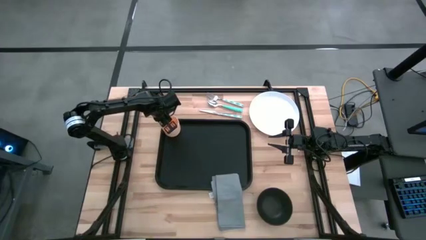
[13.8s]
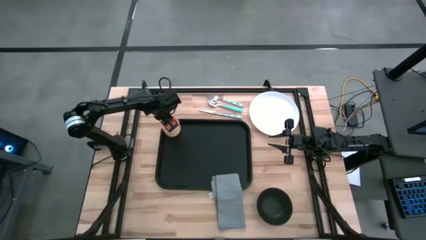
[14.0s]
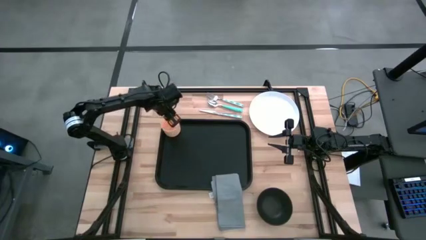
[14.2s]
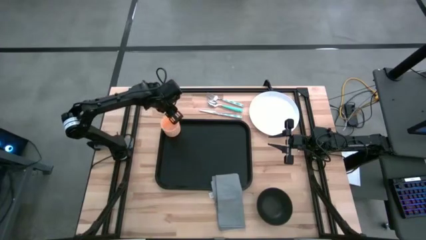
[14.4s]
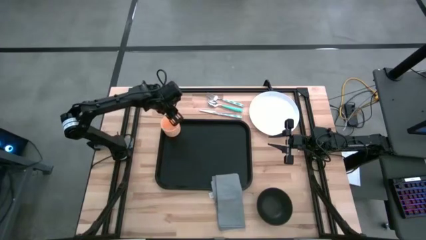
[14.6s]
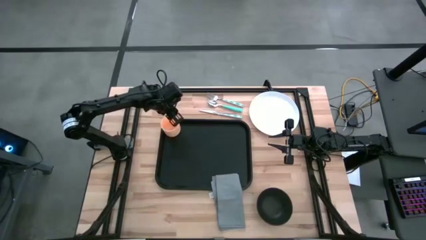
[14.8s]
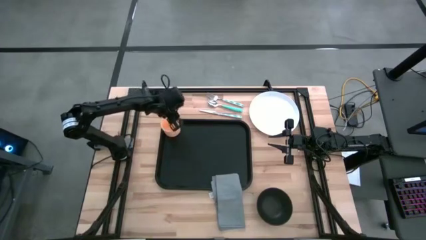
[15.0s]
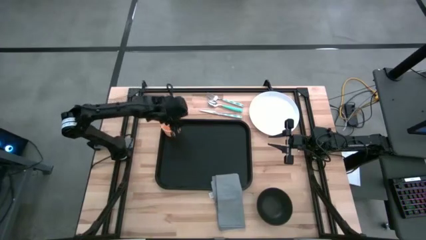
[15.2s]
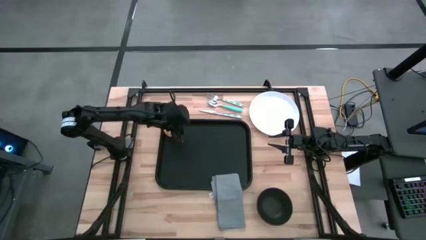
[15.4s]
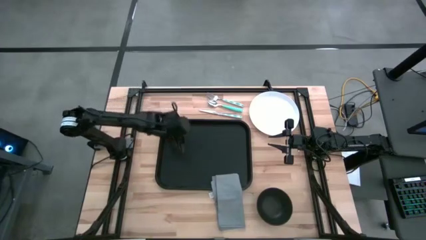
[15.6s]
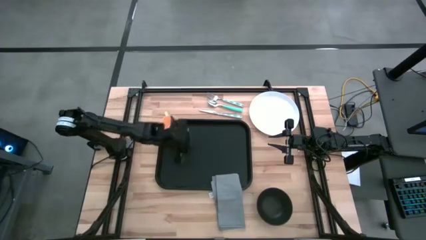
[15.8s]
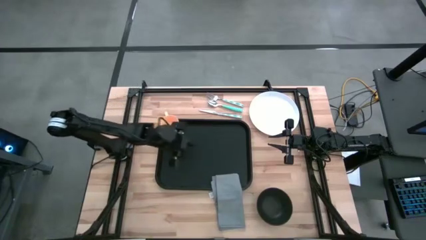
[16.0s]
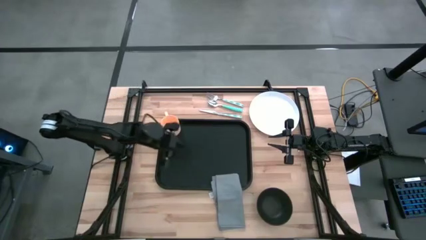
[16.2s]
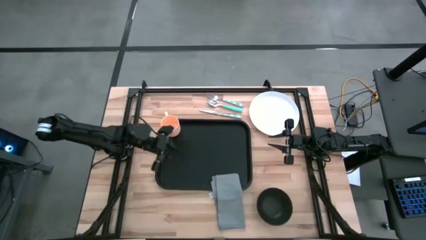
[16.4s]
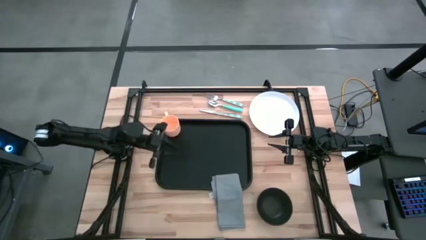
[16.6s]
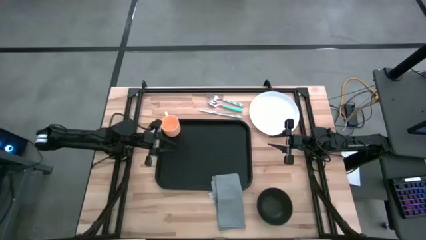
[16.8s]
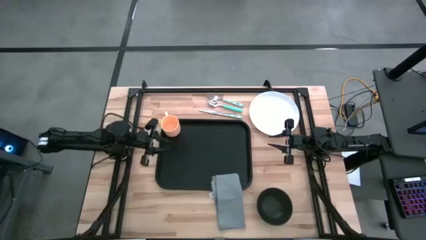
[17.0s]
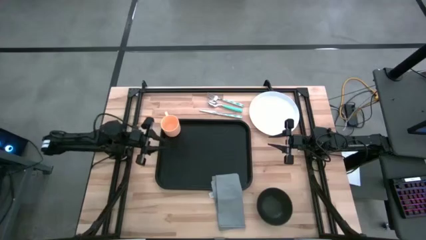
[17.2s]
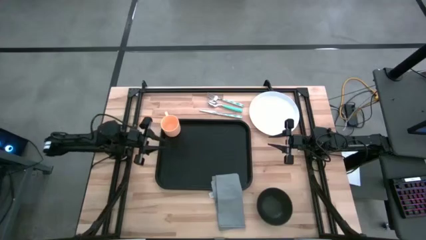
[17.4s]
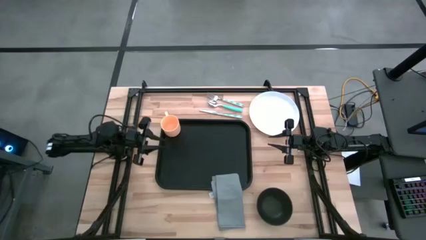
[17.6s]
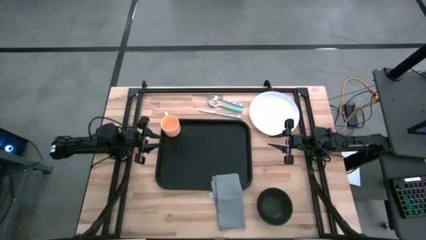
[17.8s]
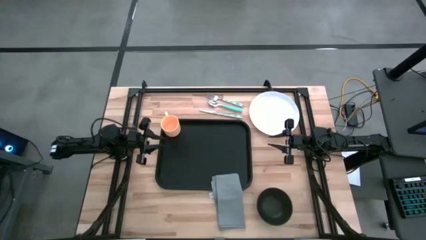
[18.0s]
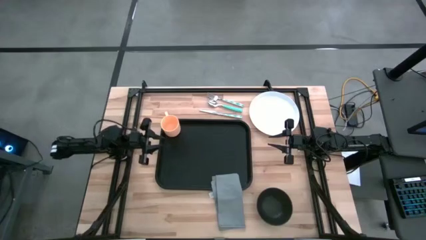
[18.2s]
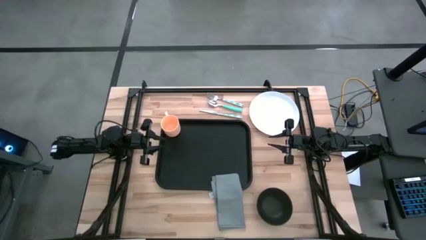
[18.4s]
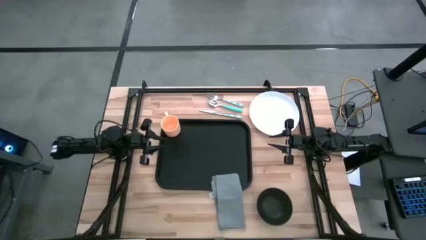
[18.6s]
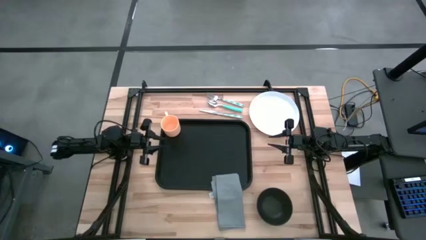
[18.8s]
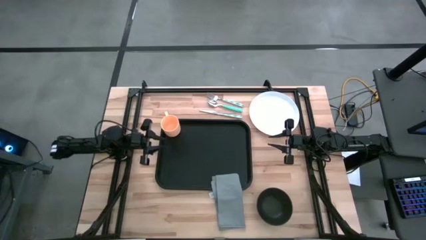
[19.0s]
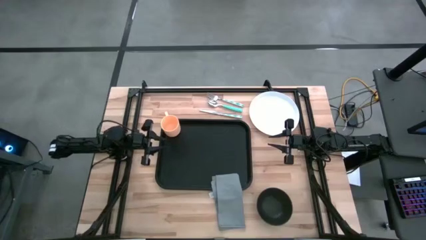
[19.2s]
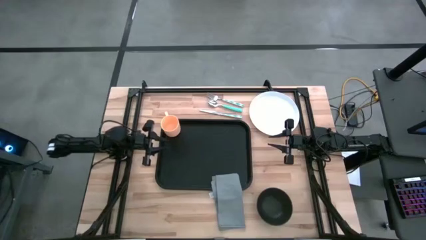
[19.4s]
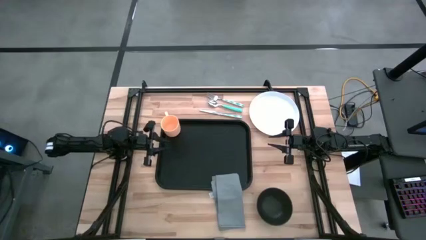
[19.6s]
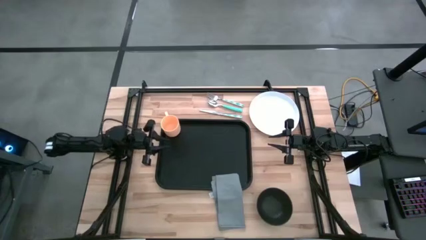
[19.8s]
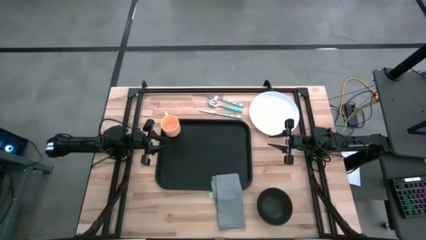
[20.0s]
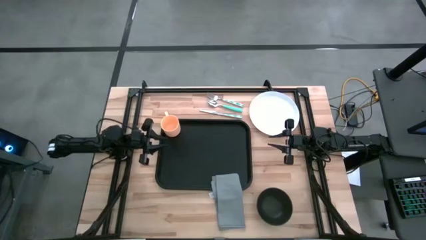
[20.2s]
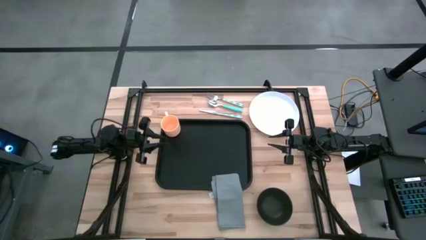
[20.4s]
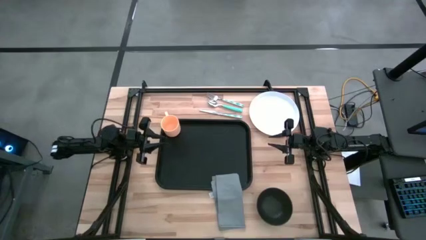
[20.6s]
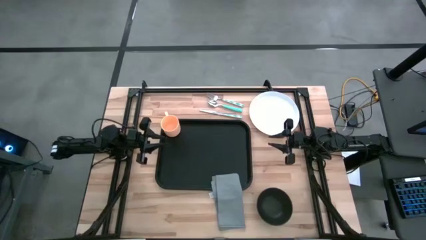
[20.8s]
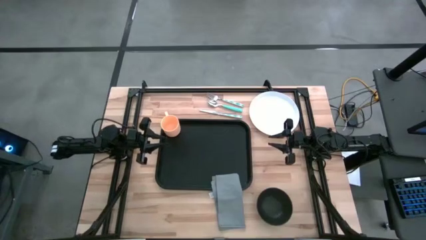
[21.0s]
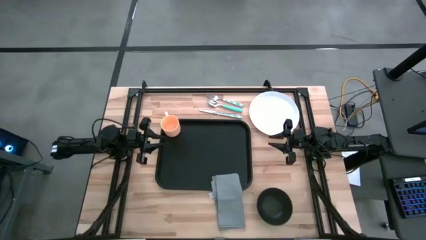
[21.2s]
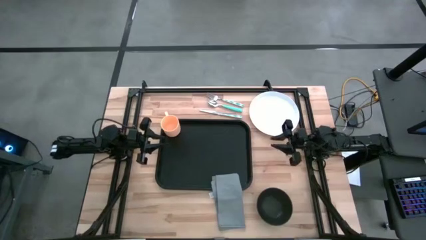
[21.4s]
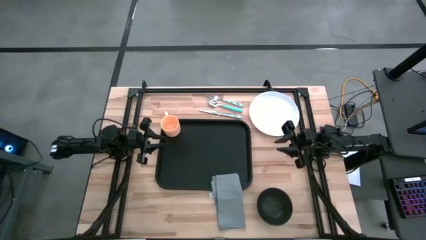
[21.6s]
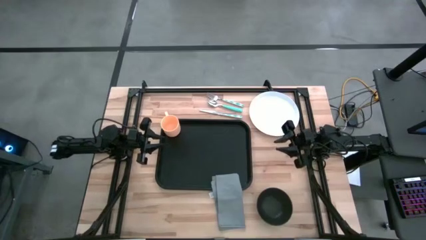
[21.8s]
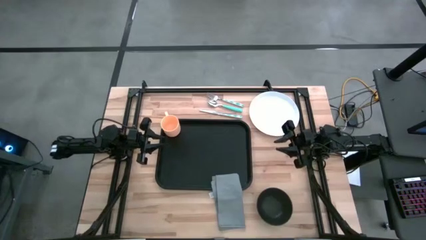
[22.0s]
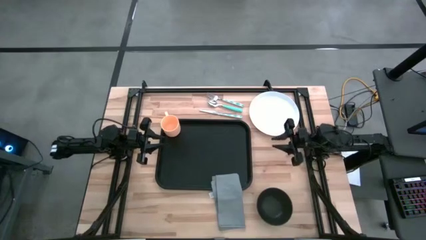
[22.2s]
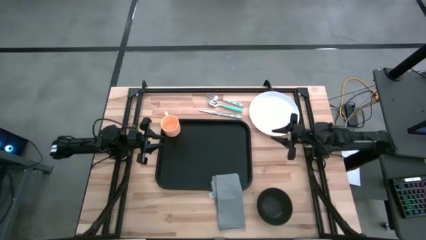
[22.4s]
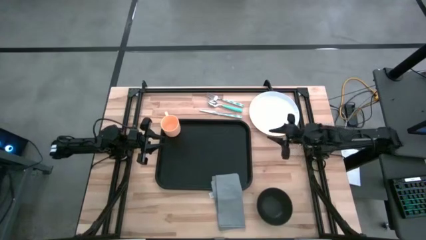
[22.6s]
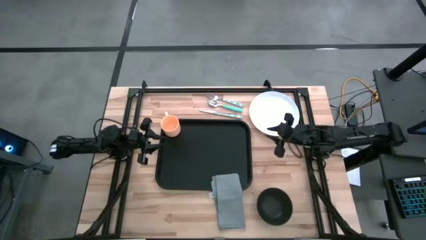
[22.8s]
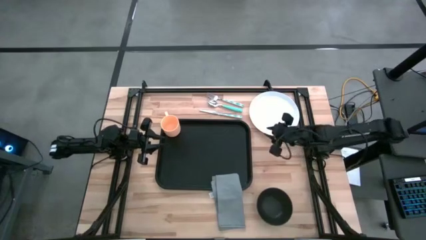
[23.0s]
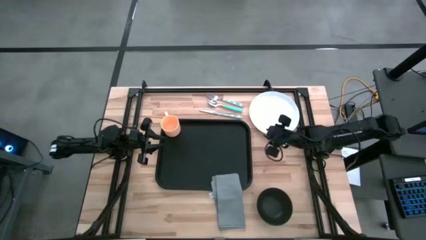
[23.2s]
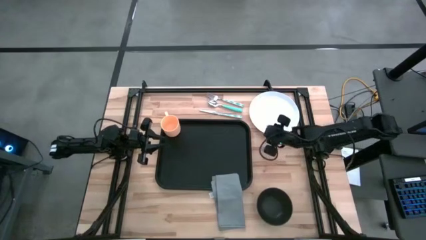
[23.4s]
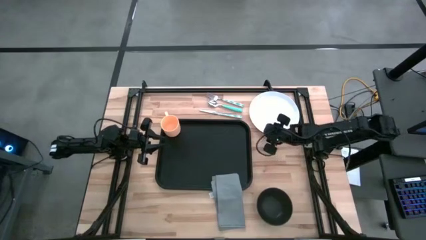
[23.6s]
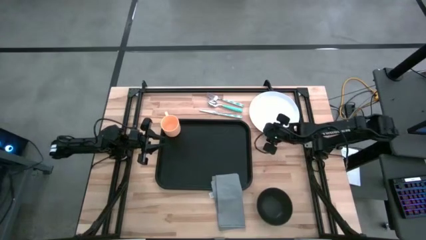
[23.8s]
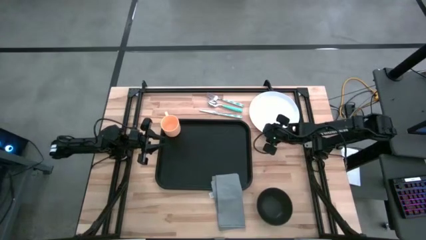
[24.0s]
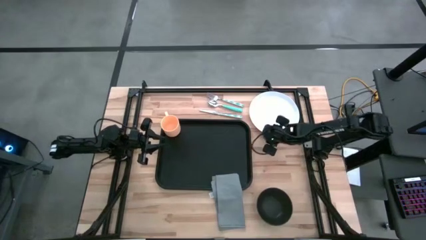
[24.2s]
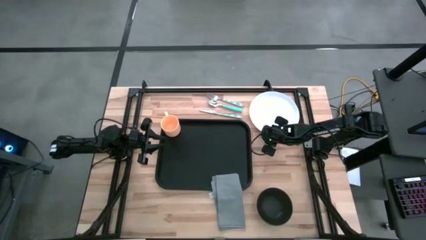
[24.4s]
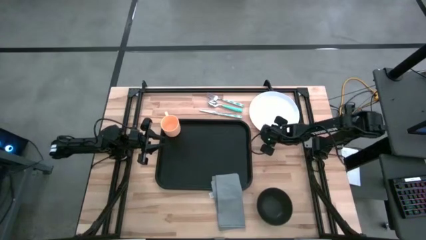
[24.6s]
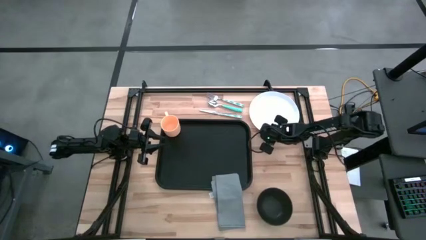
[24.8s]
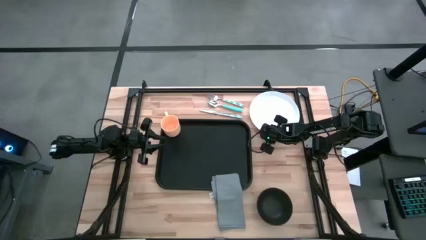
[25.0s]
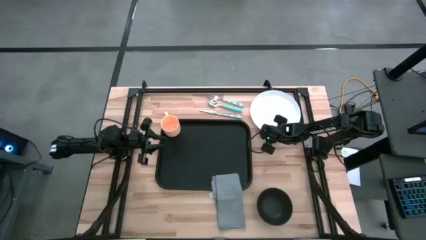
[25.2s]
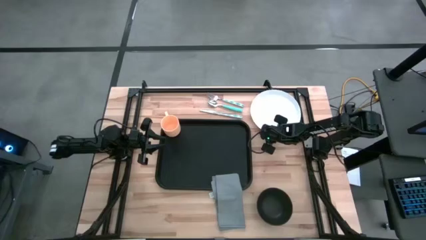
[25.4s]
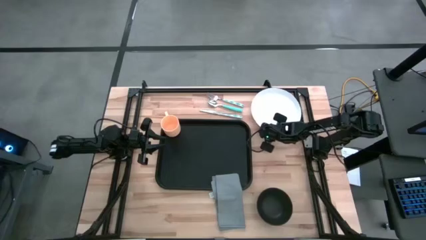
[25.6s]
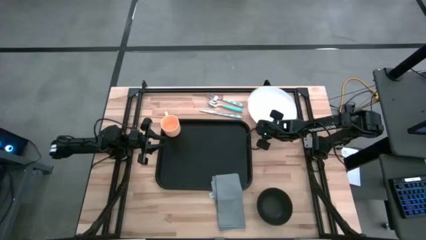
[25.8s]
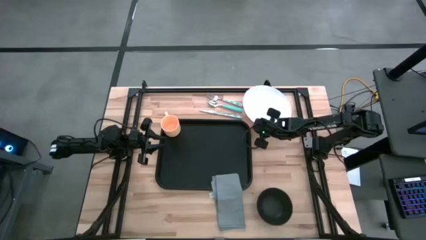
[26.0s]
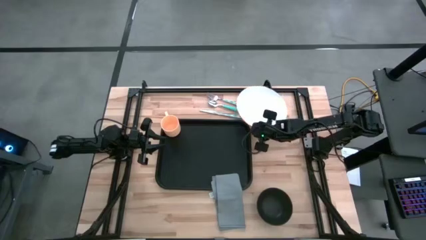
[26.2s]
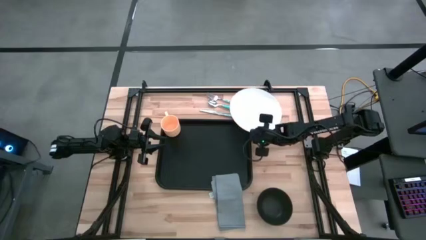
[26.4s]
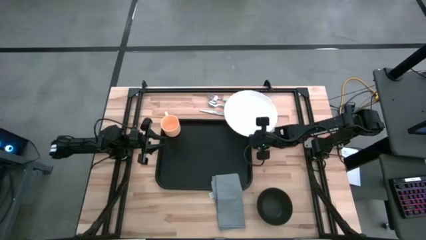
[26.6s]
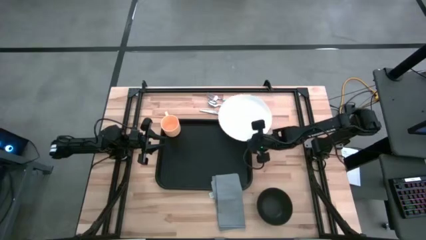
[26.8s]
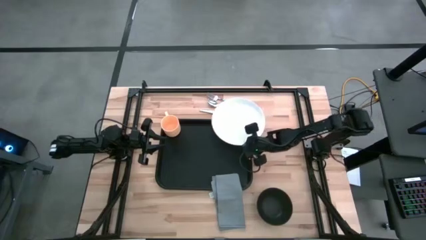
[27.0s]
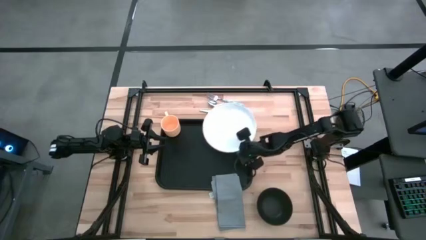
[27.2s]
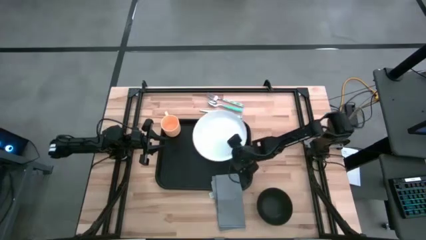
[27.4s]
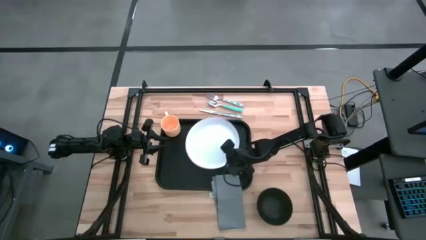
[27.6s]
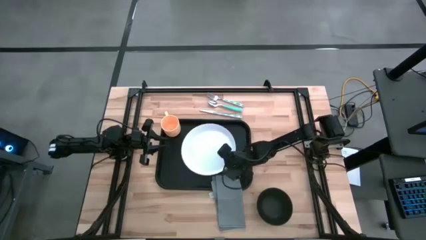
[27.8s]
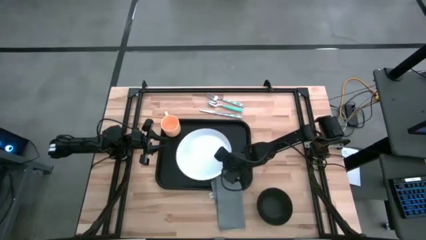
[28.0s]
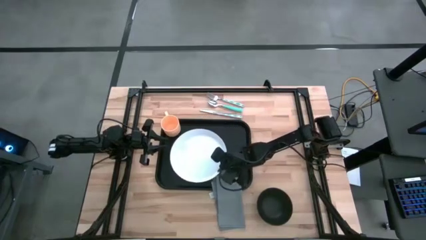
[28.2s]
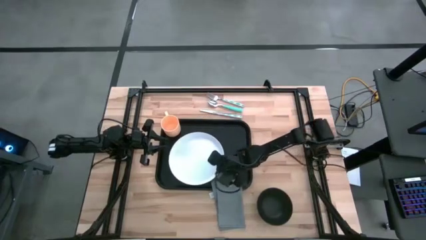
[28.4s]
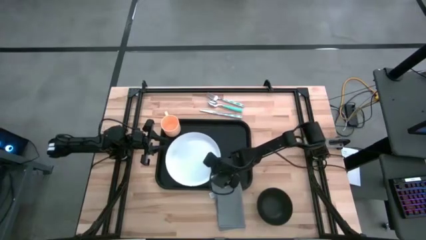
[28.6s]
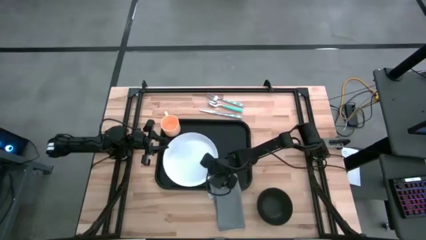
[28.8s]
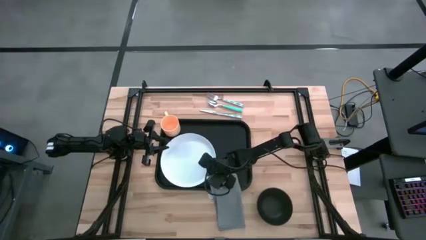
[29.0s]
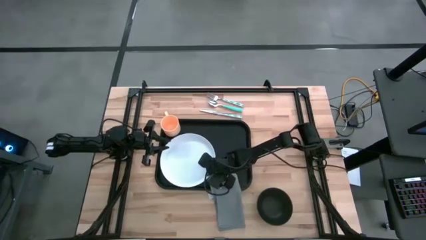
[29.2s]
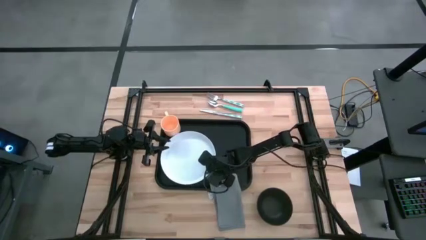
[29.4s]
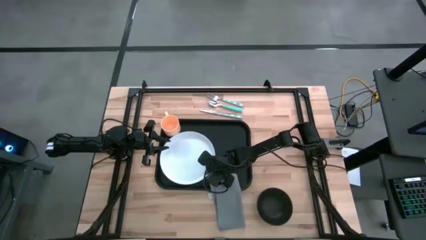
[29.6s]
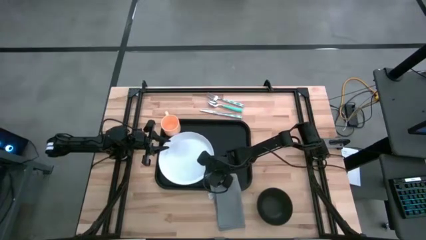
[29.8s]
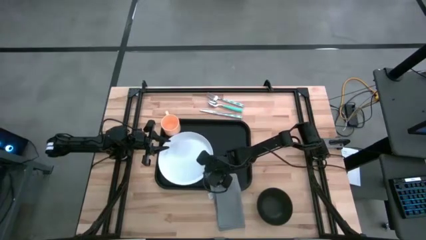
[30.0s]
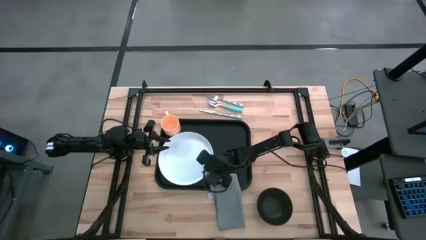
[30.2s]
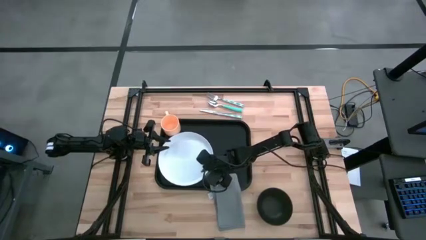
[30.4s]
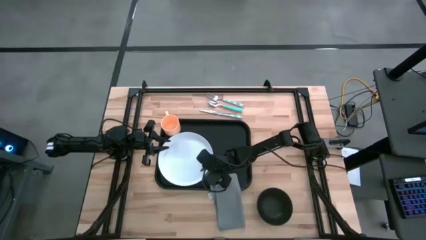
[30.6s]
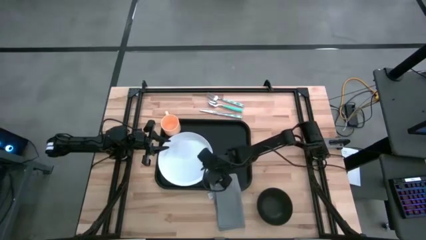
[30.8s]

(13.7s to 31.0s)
Task: Set up tray
Put the white plate on the black table tray below the orange cup
